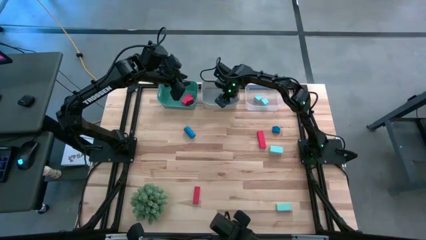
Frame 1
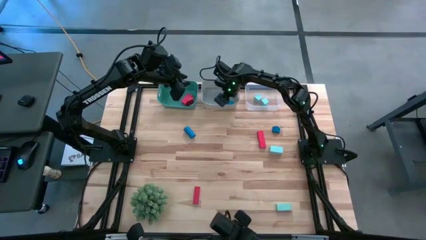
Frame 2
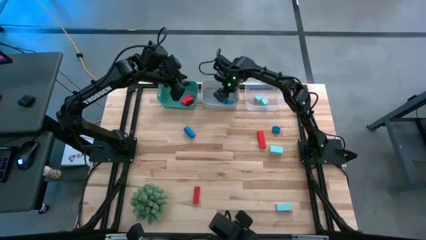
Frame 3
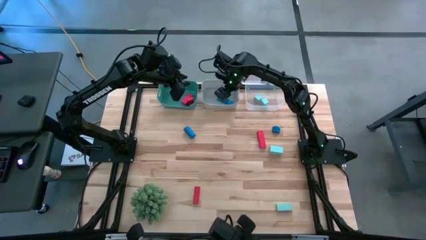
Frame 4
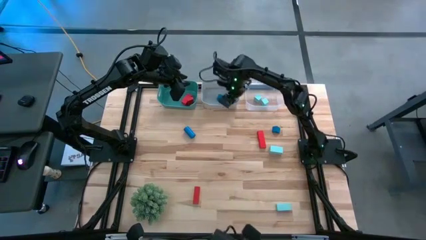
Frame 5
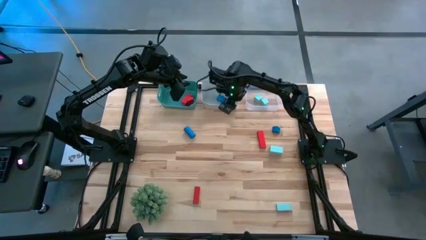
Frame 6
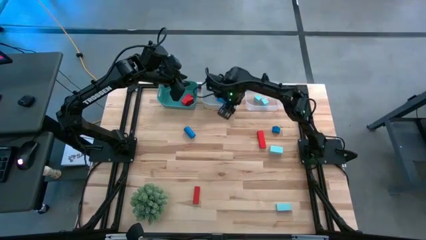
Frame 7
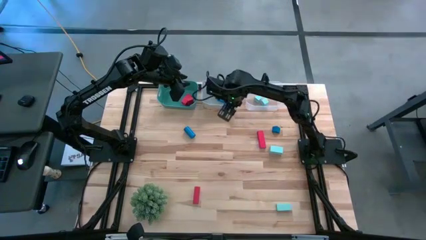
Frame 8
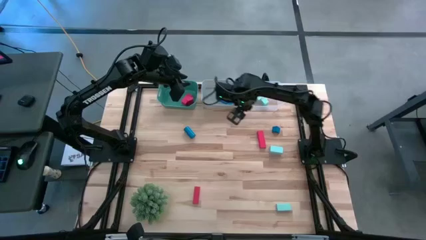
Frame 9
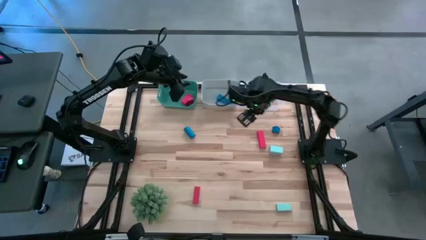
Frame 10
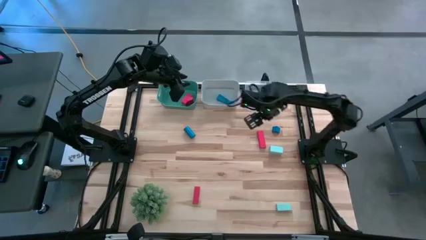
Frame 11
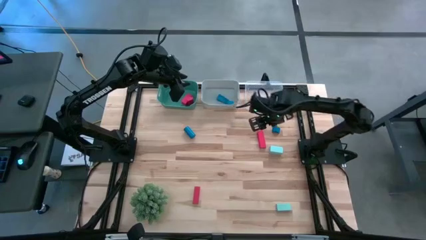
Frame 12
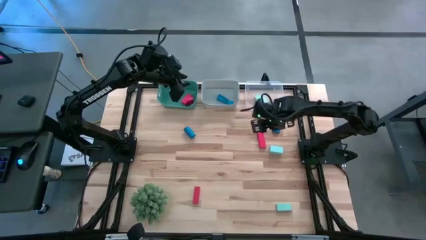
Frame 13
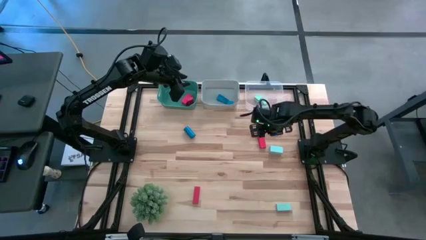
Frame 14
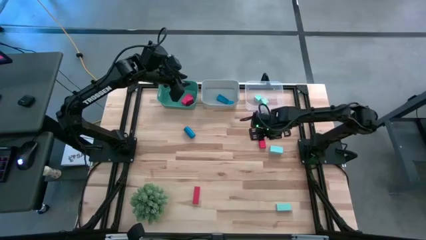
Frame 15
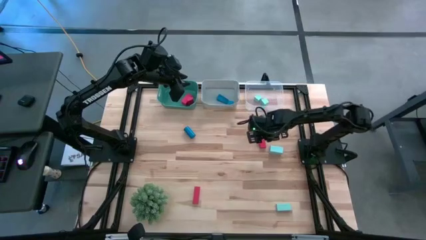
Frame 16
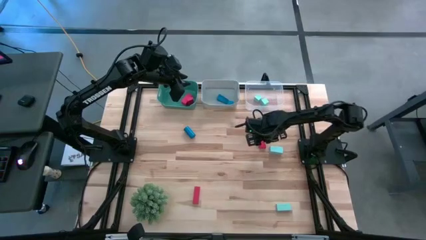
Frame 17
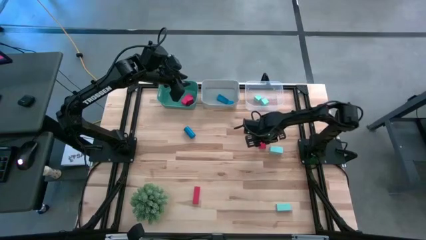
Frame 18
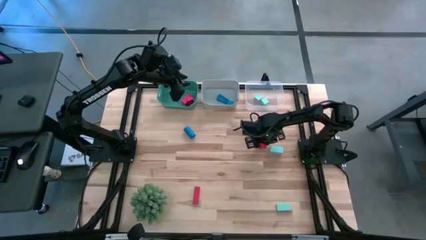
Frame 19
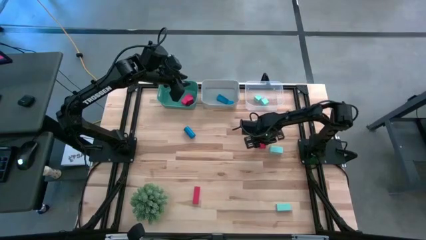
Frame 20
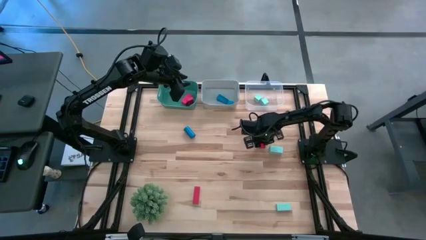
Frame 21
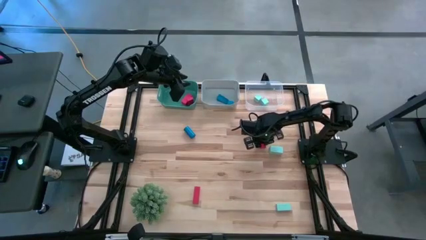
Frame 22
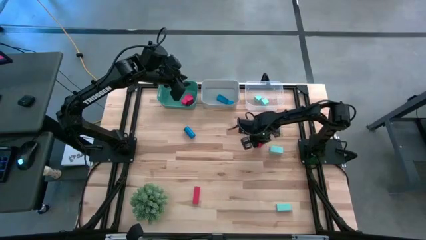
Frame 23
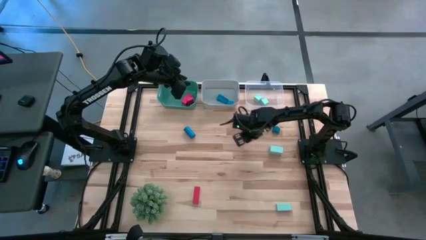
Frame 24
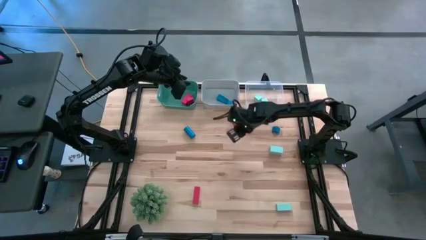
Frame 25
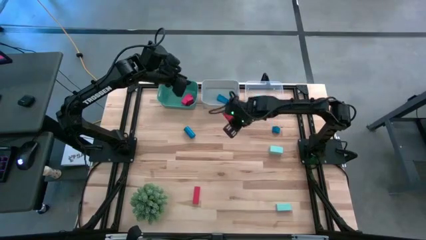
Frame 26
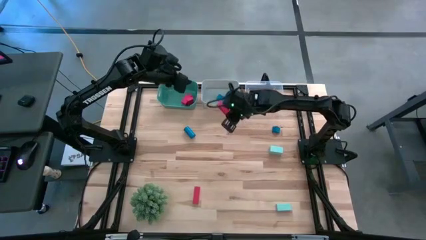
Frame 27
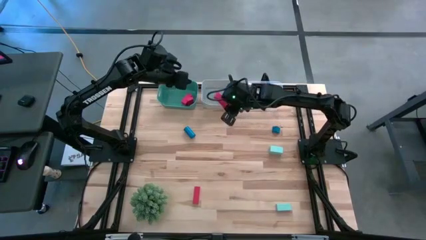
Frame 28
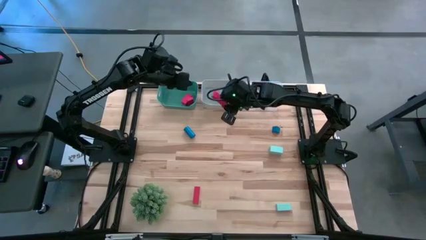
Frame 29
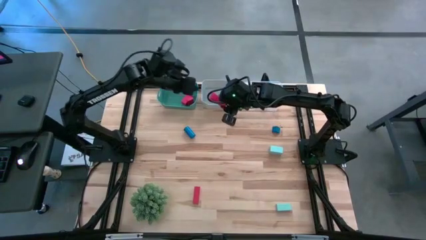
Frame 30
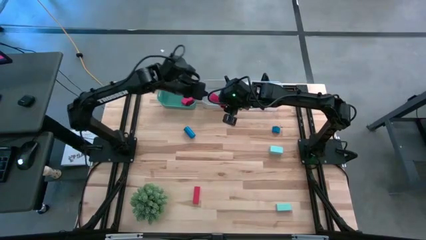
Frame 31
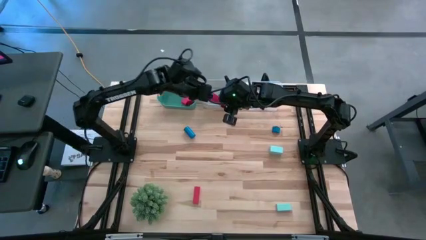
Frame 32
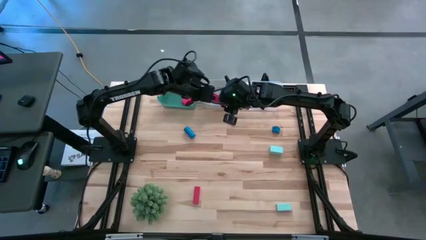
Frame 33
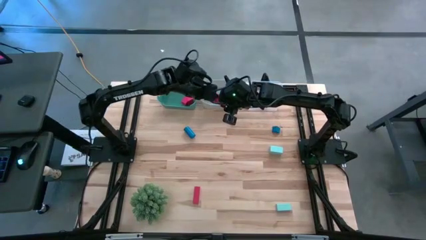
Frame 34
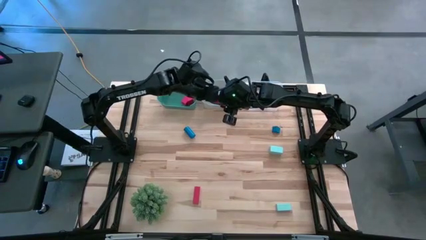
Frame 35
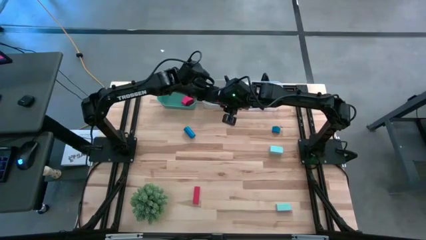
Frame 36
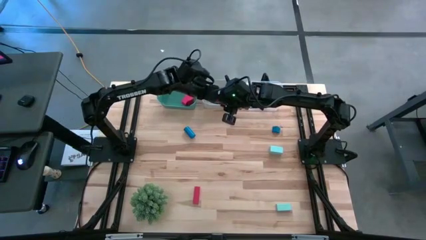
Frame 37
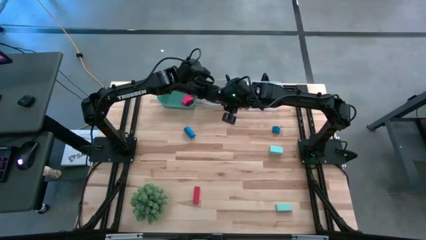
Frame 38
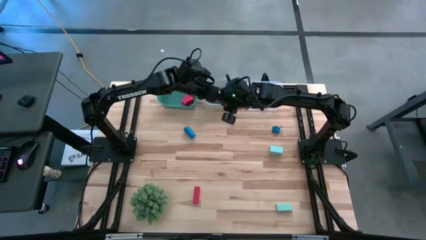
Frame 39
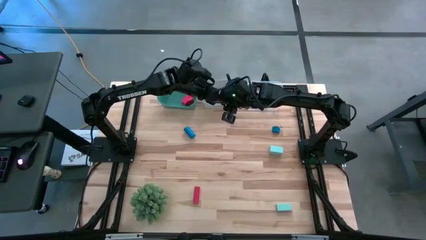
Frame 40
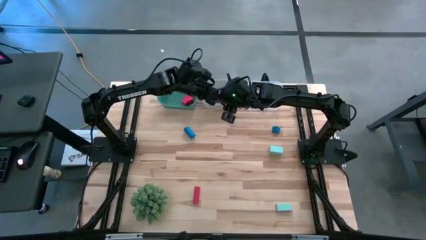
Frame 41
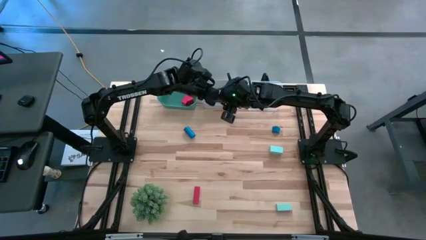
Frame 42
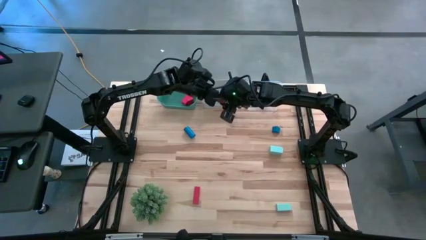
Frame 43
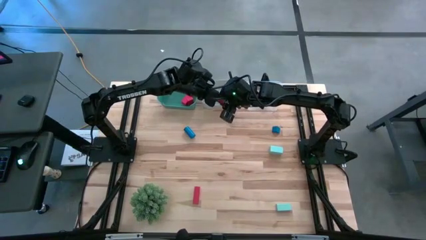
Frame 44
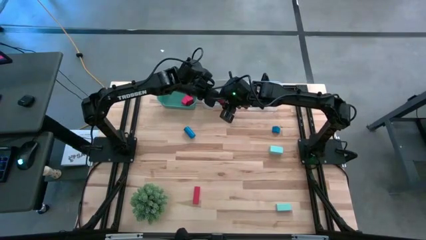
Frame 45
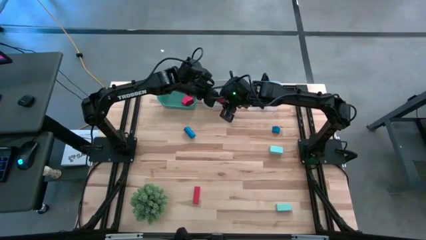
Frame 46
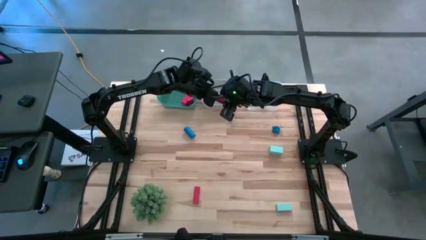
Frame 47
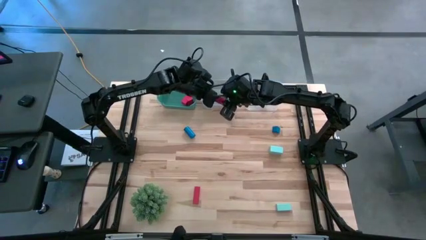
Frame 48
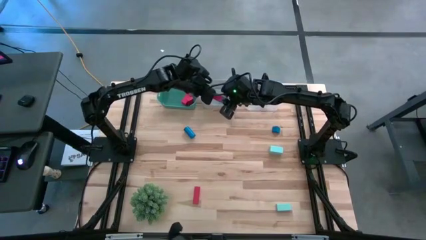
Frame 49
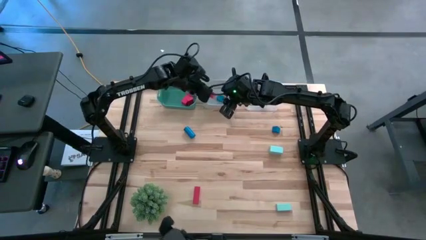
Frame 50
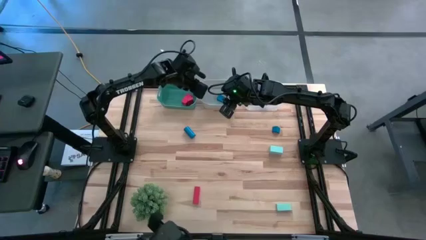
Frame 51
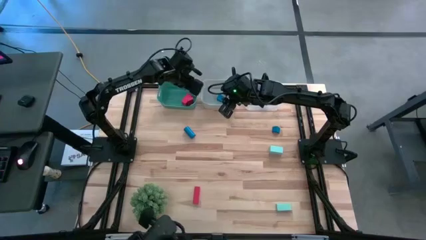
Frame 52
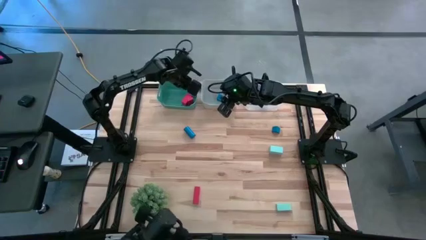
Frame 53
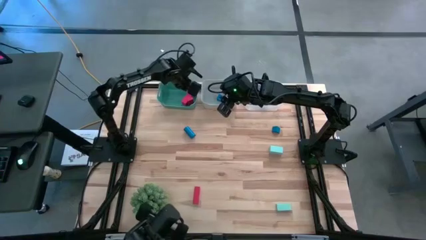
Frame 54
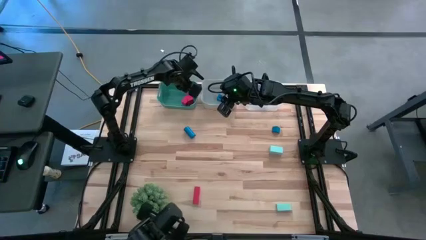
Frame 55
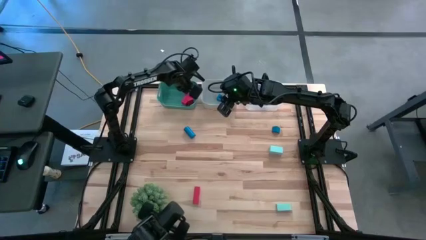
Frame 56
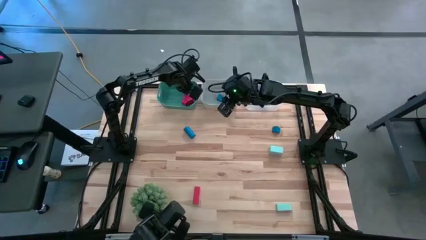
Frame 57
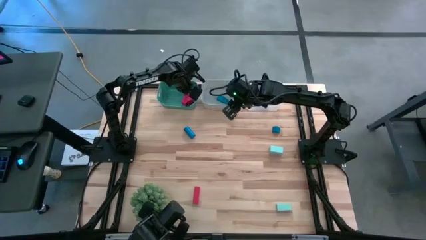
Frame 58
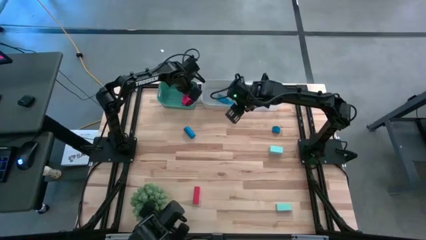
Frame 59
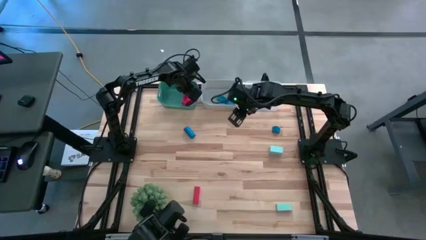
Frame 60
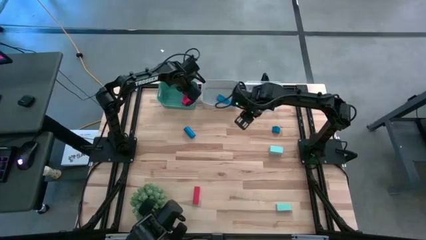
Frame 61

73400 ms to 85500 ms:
Task: Sort & place blocks by color
Put the red block into the green bin

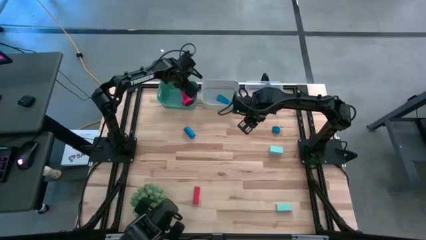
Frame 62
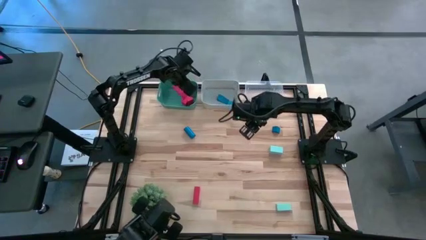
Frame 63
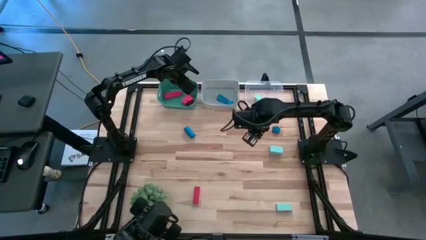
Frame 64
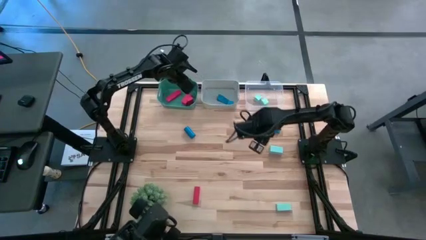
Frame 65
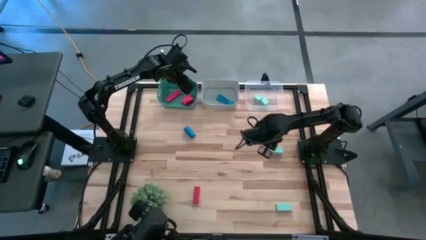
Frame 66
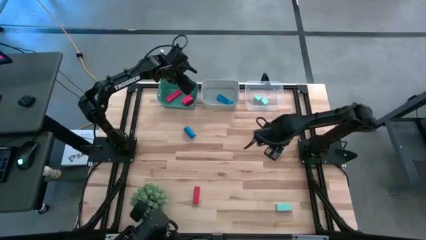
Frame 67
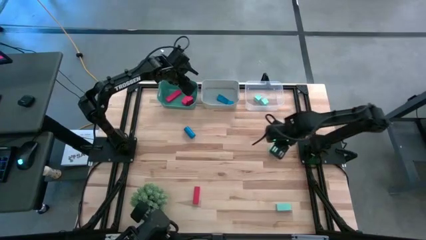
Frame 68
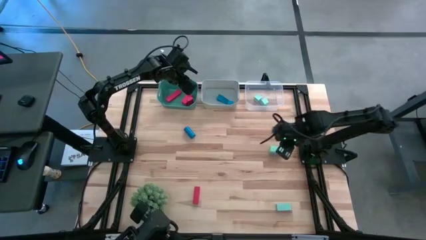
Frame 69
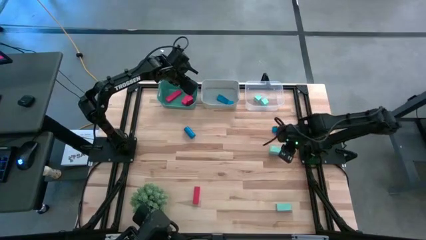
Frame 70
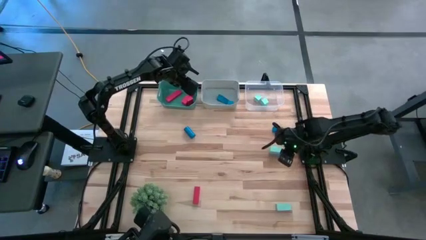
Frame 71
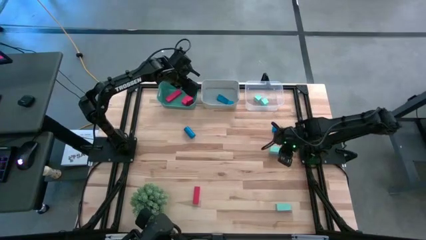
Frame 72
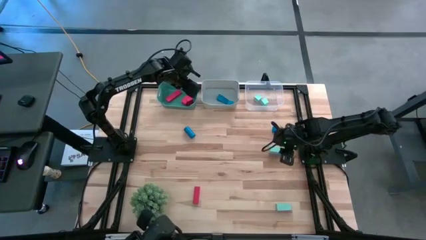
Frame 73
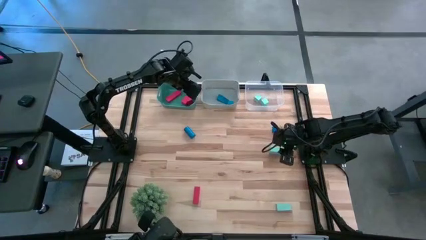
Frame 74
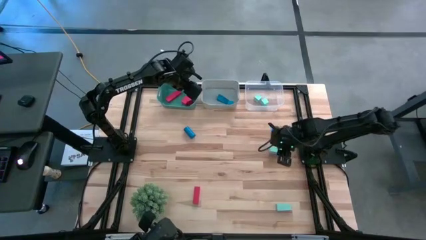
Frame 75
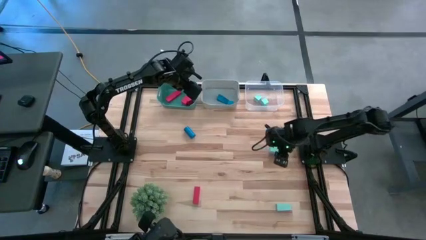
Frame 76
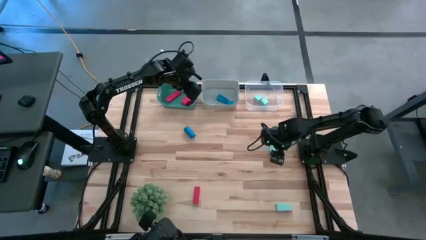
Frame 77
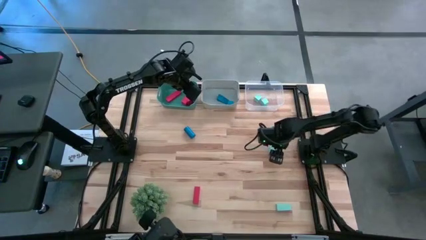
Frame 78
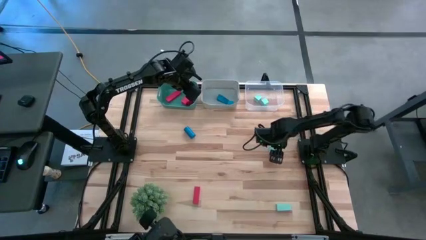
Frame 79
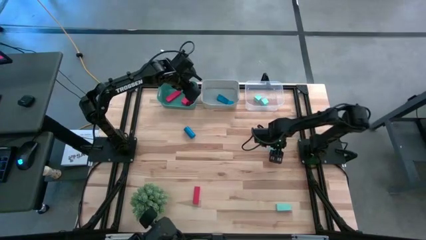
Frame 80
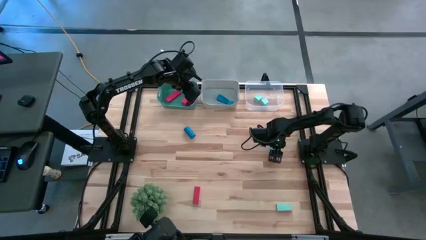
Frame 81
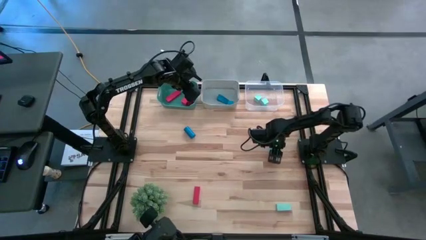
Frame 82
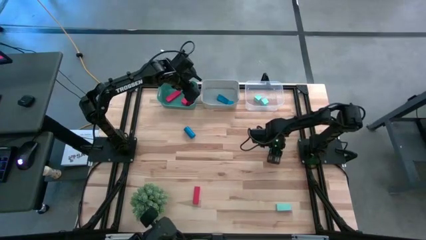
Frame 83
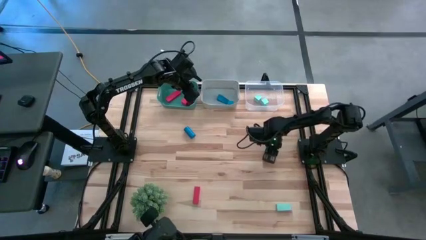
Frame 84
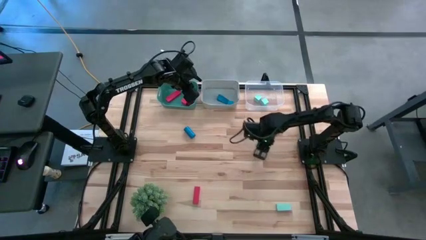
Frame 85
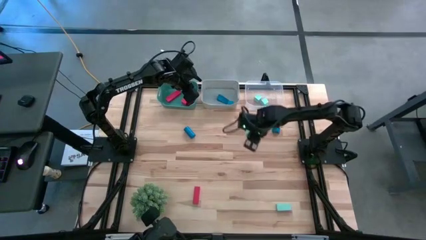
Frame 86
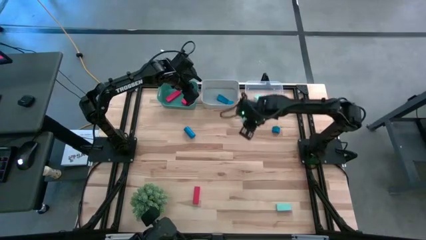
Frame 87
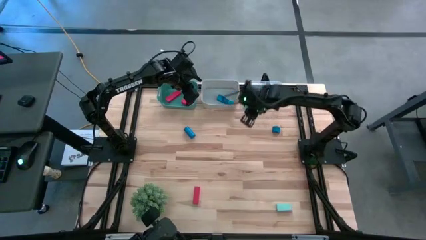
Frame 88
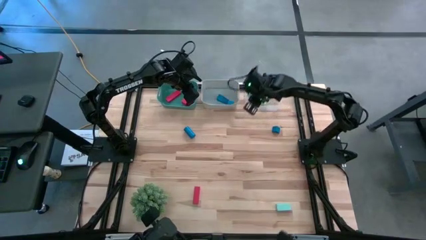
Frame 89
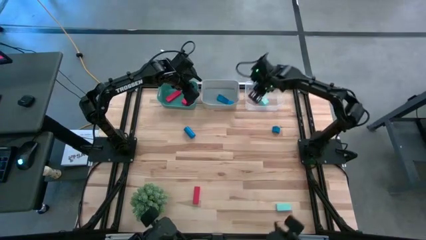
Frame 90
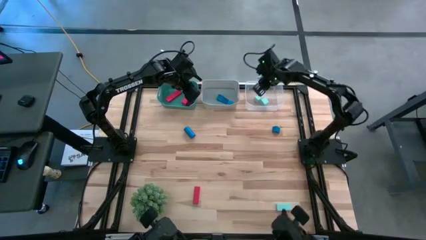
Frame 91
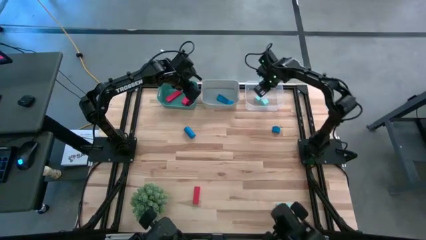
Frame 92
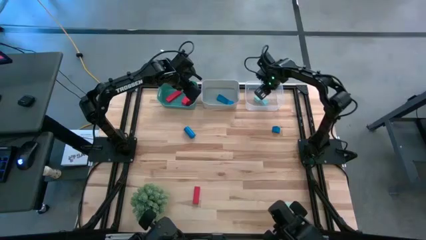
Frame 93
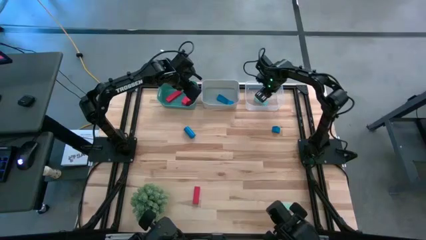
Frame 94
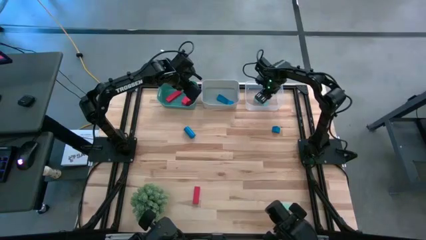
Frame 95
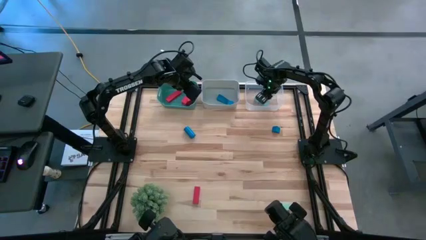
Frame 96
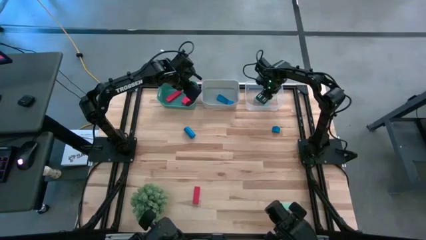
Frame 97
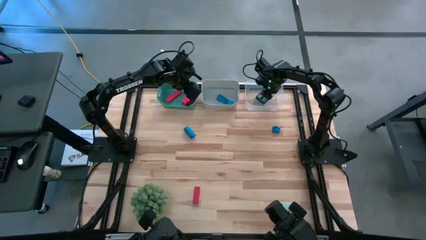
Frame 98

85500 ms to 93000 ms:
Put the light blue block into the transparent bin
